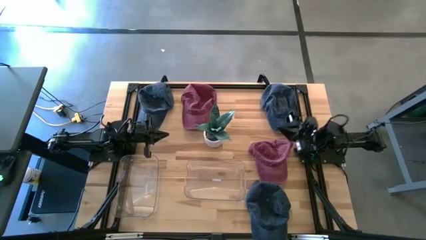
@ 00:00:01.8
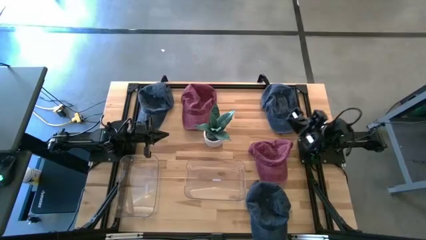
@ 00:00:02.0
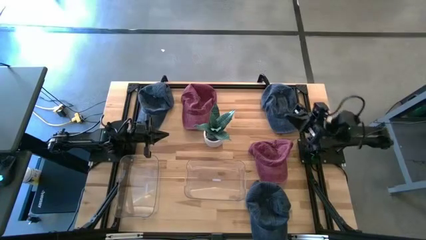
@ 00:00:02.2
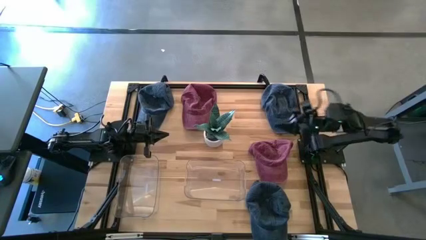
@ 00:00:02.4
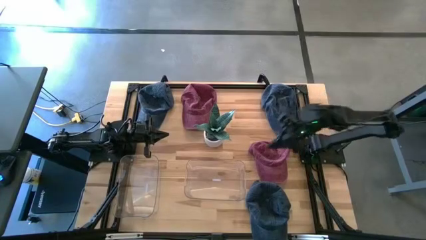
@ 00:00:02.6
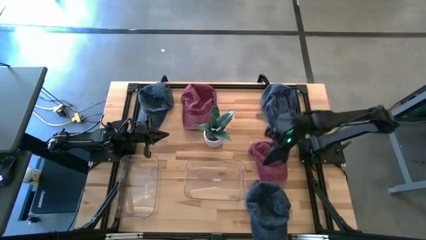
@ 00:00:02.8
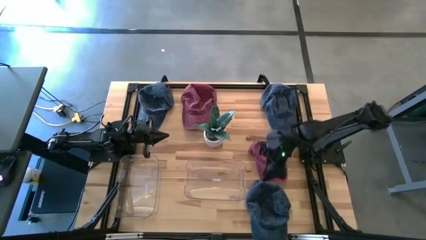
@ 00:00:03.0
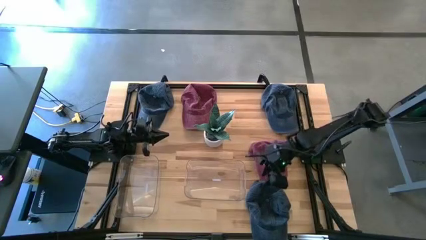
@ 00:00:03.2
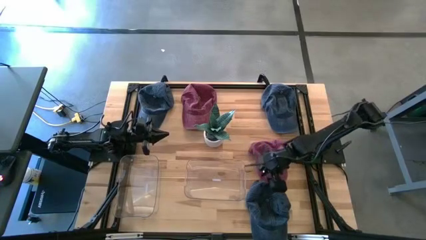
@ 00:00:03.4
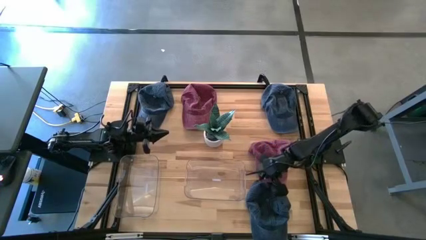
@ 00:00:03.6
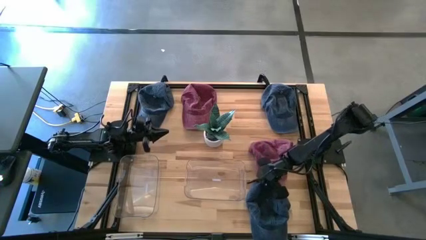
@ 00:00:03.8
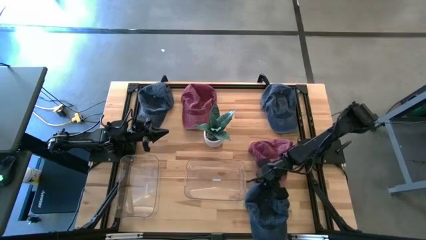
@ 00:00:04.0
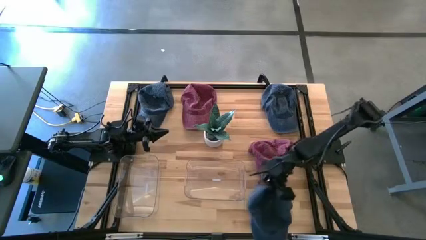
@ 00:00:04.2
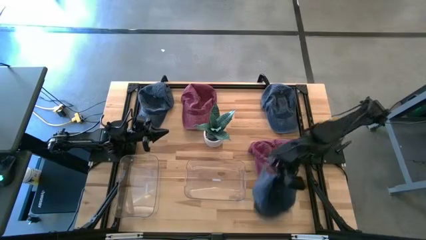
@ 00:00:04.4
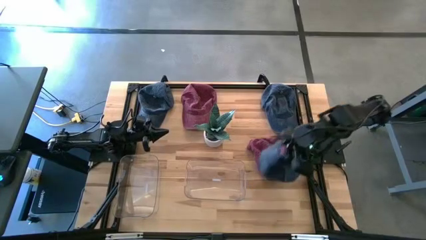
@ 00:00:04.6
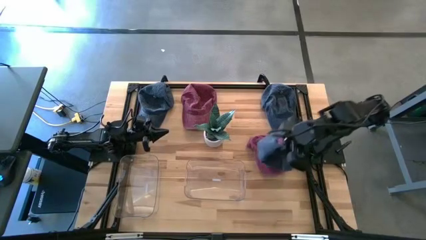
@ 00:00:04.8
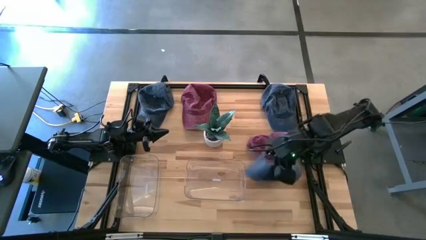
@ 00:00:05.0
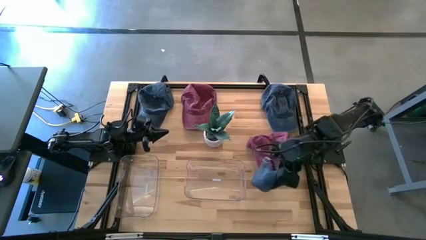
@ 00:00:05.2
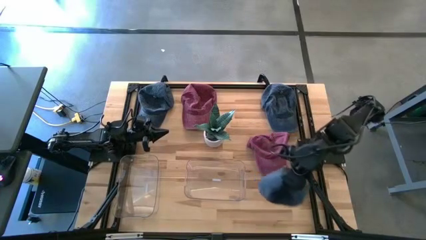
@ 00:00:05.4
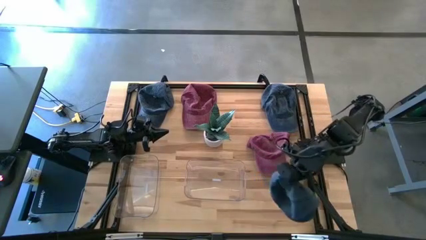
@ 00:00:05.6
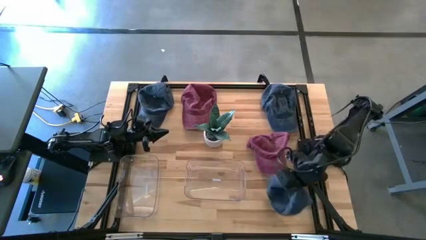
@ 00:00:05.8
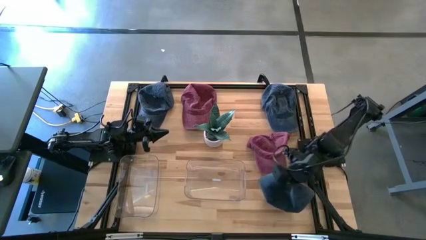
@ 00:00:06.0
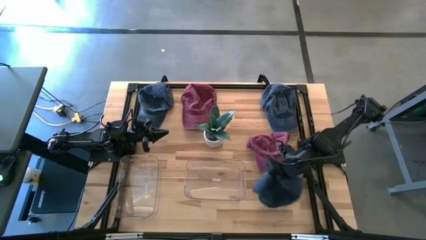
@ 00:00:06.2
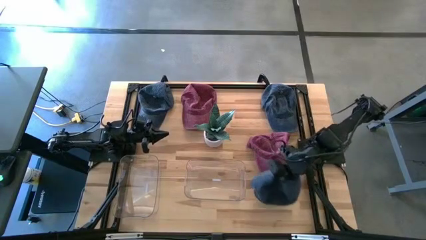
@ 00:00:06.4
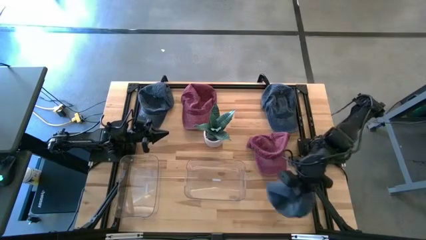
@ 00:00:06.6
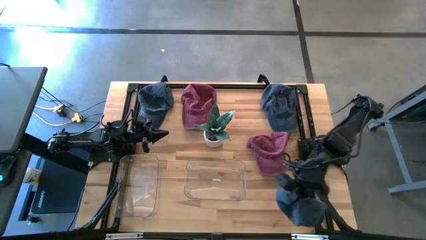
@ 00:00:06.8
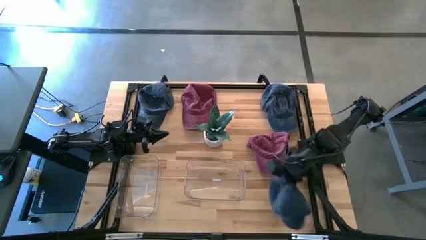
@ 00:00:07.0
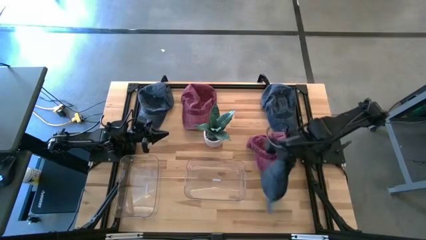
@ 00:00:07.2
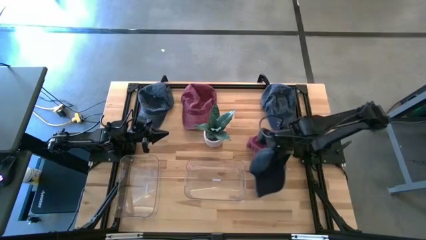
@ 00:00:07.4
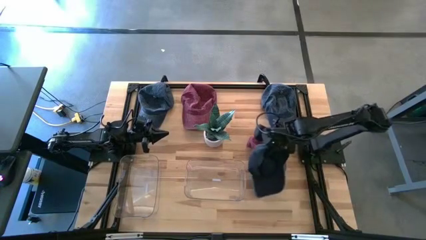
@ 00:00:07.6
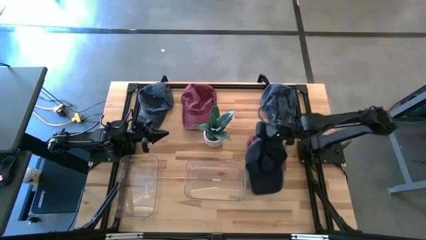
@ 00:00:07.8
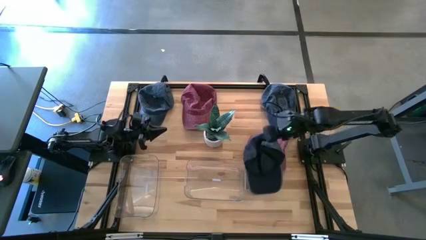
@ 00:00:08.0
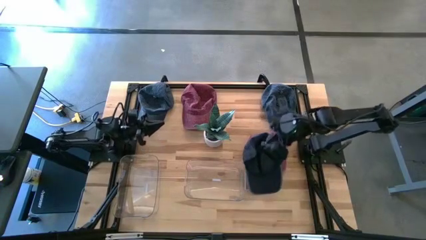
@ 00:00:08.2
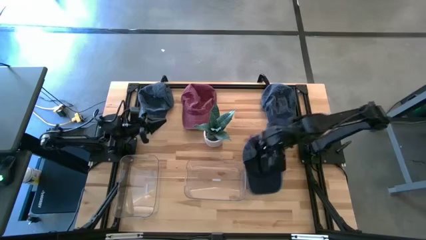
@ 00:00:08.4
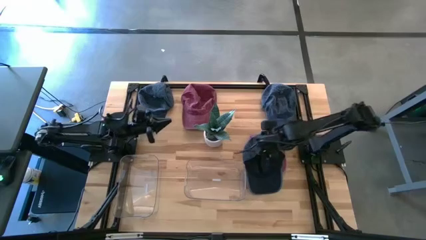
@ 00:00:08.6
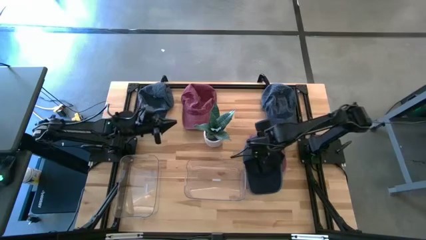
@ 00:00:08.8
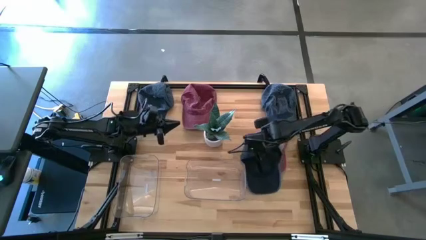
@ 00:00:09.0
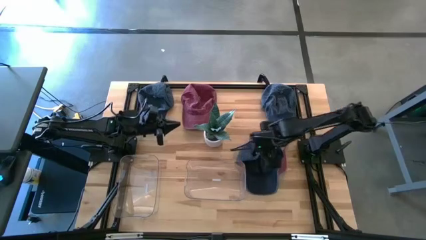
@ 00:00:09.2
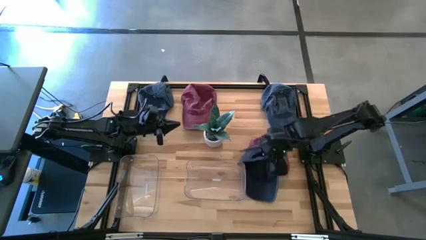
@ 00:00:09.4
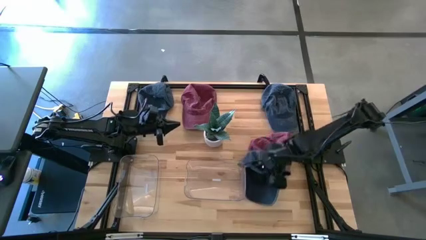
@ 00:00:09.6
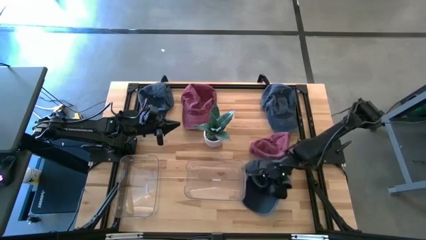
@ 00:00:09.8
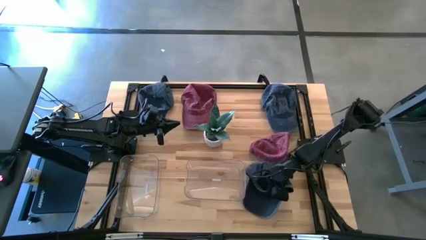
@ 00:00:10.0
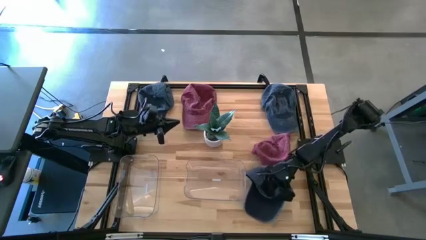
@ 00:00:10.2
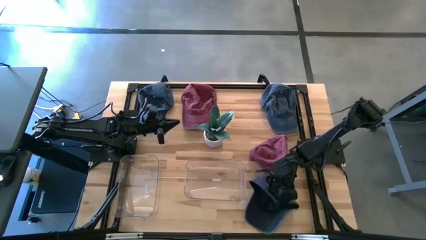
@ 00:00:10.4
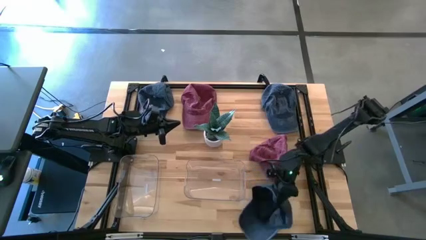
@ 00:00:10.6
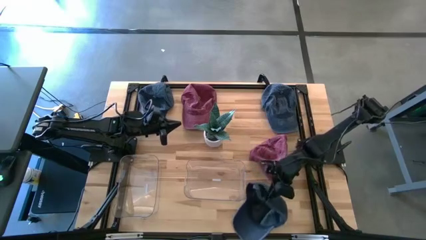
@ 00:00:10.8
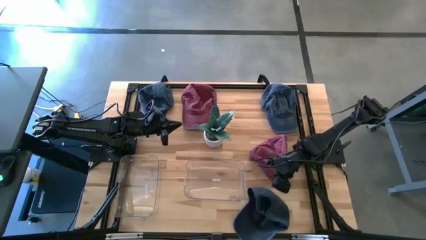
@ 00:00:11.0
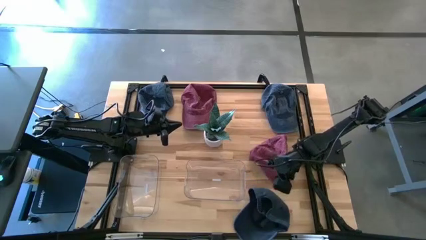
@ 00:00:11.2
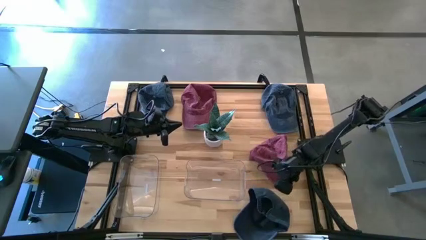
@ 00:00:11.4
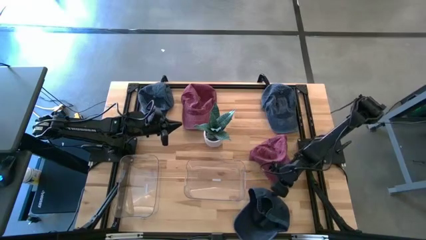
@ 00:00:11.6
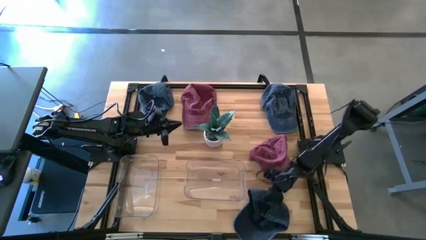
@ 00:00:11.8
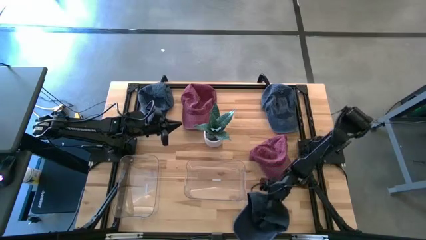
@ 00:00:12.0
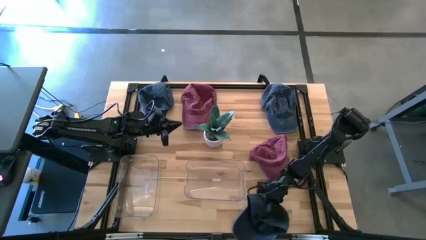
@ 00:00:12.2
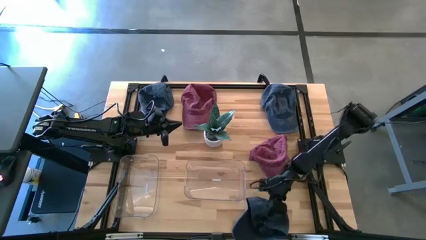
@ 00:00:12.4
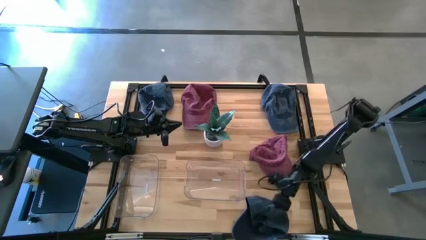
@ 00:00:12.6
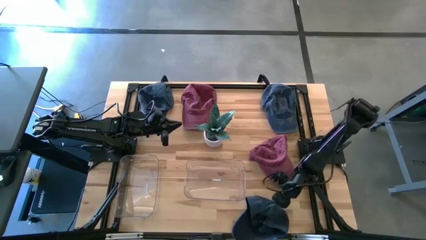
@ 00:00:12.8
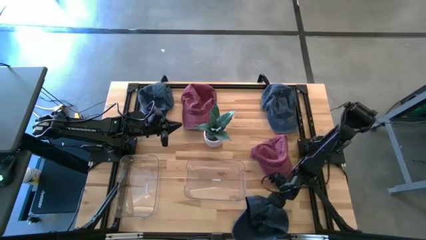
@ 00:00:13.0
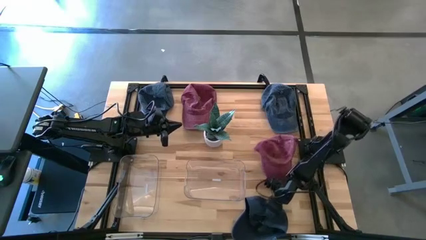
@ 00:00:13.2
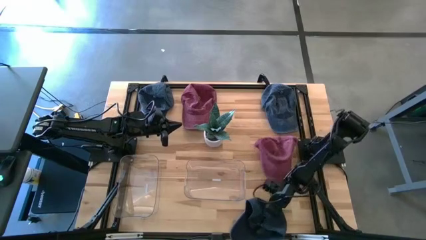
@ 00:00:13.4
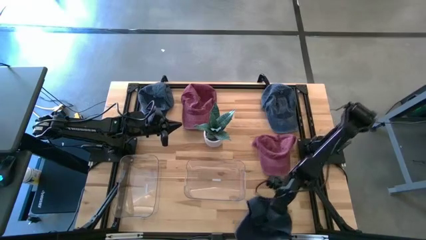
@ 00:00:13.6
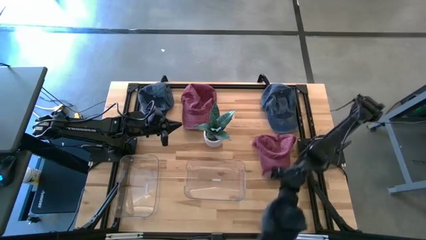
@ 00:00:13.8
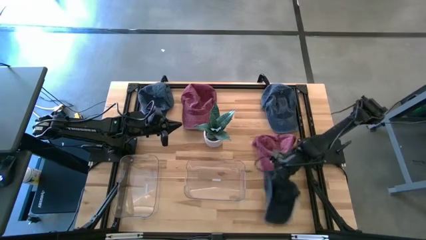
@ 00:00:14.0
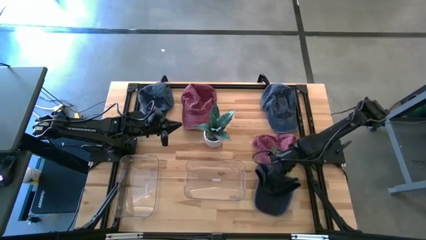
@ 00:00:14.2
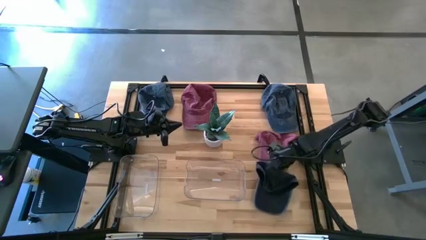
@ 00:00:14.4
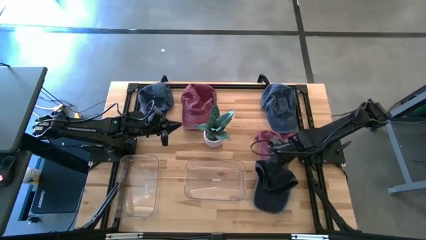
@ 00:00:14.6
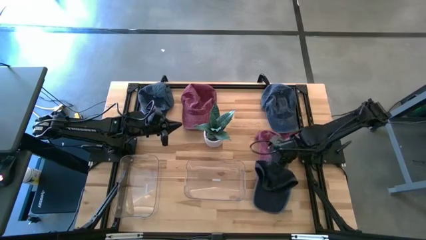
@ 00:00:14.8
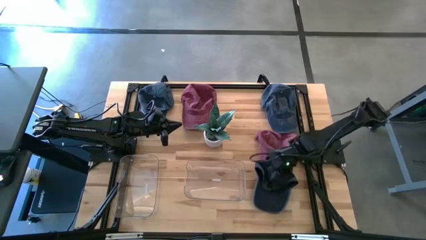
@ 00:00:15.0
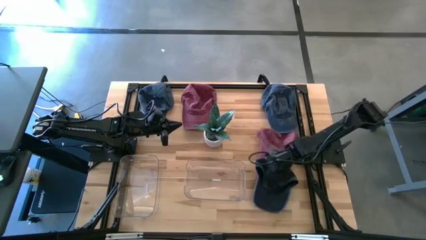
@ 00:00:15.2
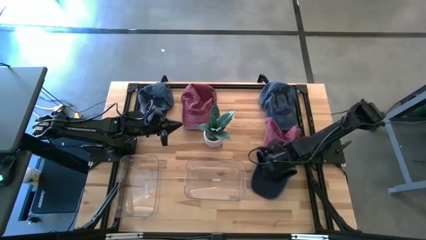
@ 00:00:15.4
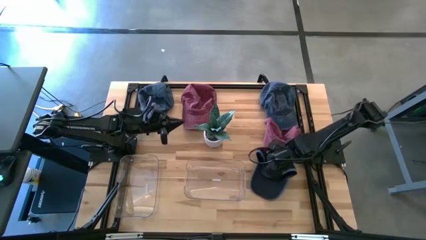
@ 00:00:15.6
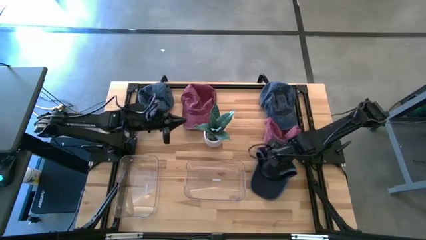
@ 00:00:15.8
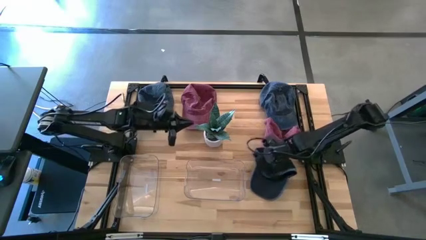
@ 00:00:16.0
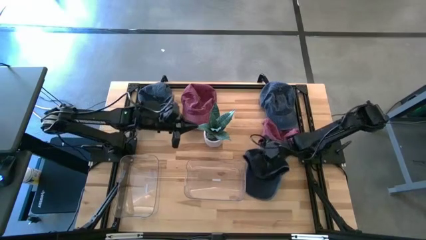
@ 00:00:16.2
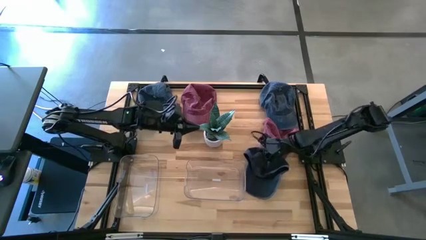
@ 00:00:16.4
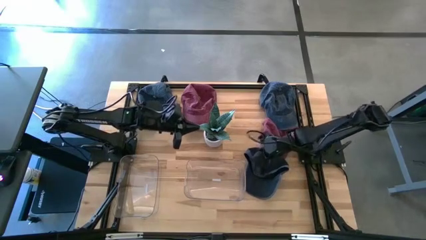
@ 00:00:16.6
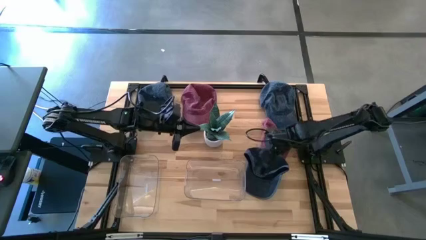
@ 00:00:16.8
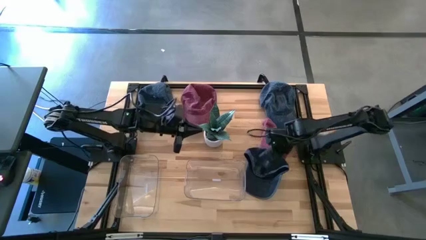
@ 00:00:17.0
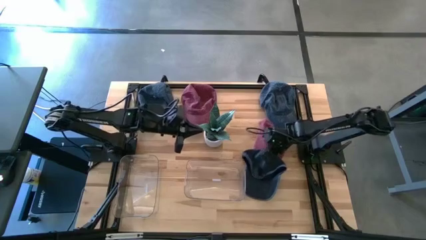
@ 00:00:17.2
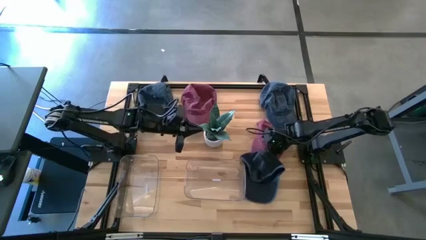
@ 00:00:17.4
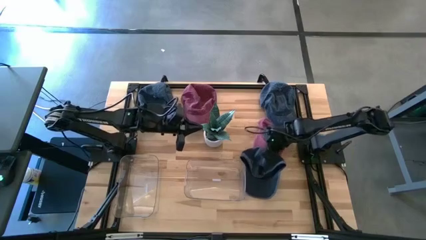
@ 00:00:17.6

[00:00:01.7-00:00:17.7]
Task: Pick & Place hat
Put the bottom blue cap into the left transparent bin

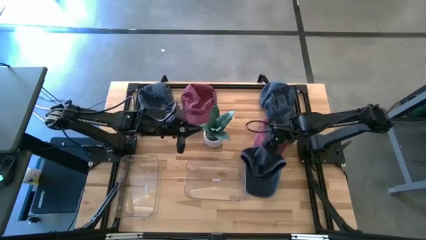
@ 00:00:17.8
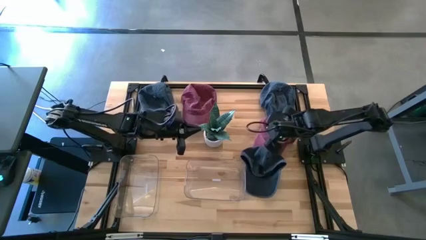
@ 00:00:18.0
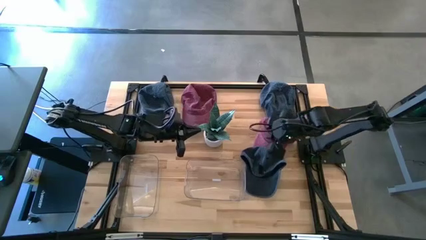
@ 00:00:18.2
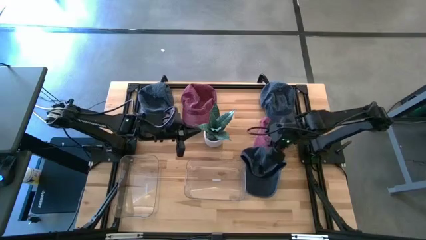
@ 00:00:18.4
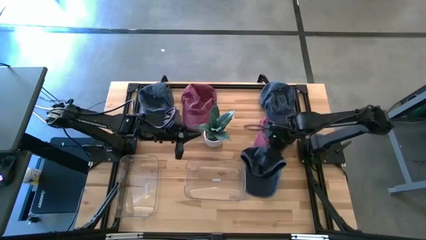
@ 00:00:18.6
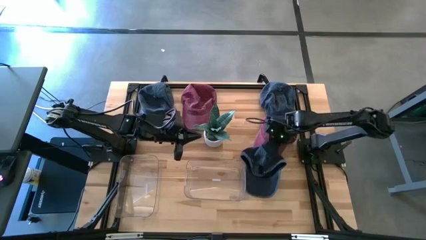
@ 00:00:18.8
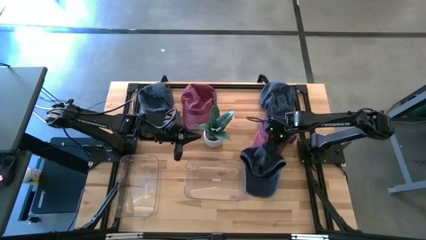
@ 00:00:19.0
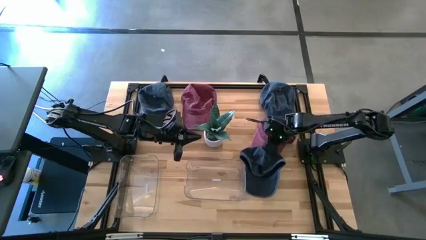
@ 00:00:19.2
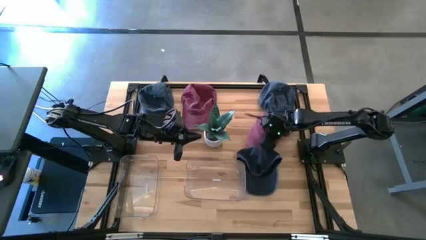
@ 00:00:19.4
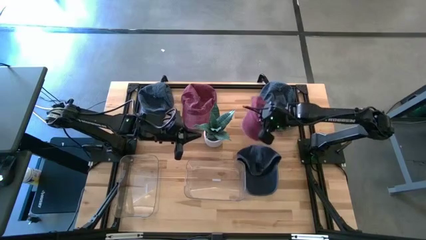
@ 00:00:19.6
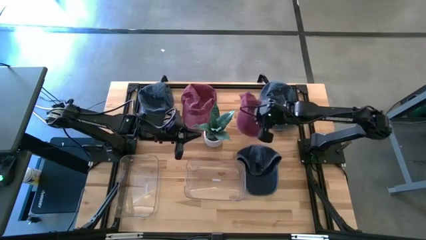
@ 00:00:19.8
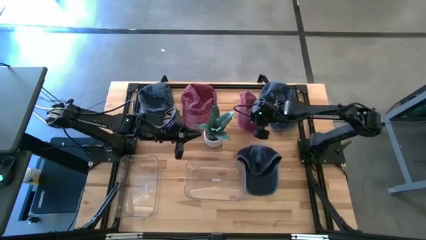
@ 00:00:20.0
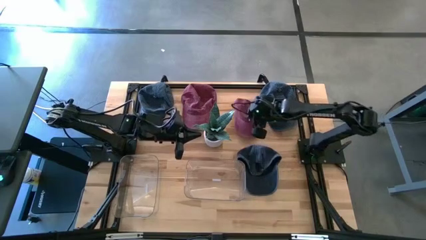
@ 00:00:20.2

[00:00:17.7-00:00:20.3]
Adjust the bottom pink cap on the table
